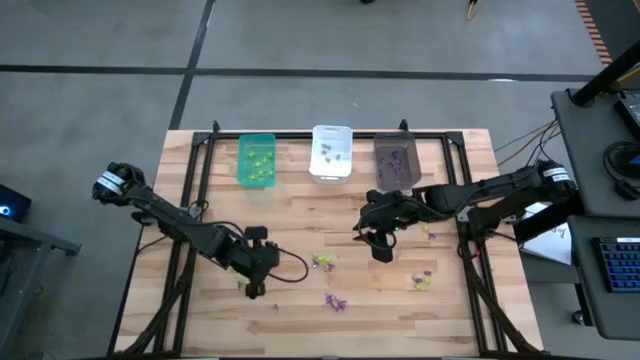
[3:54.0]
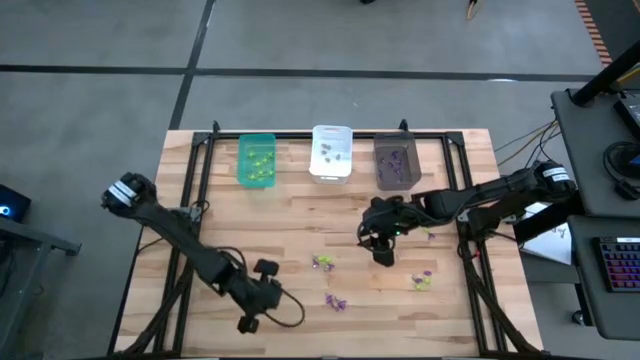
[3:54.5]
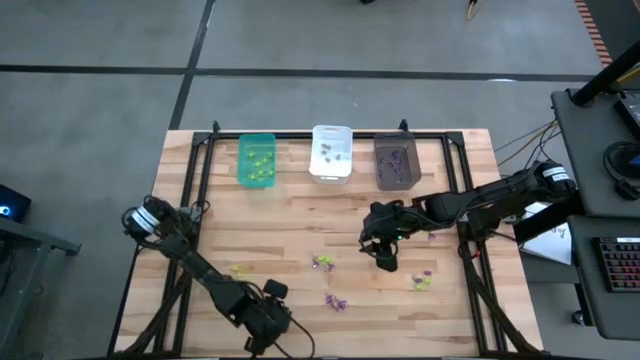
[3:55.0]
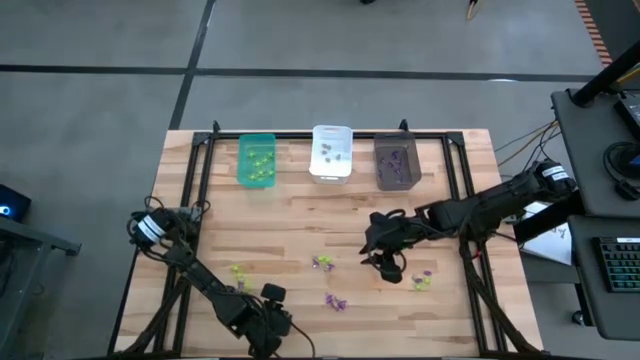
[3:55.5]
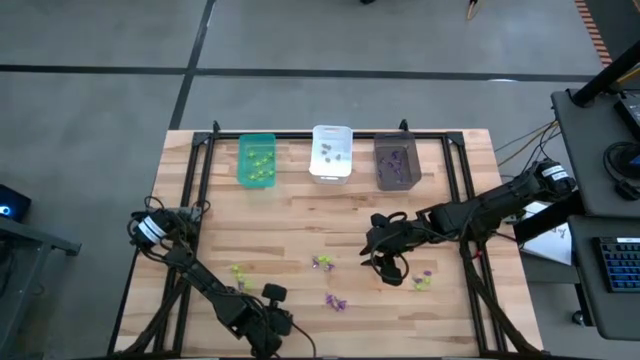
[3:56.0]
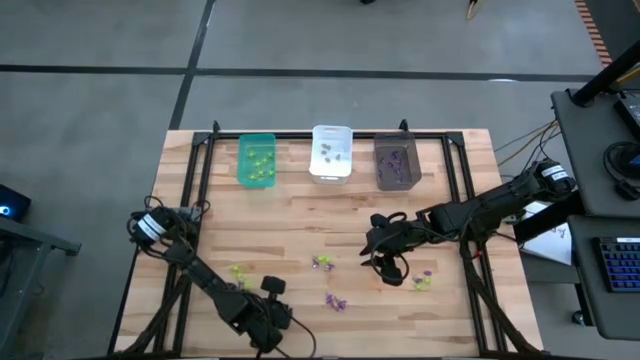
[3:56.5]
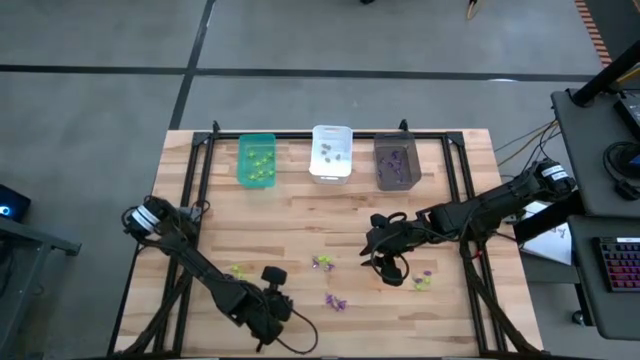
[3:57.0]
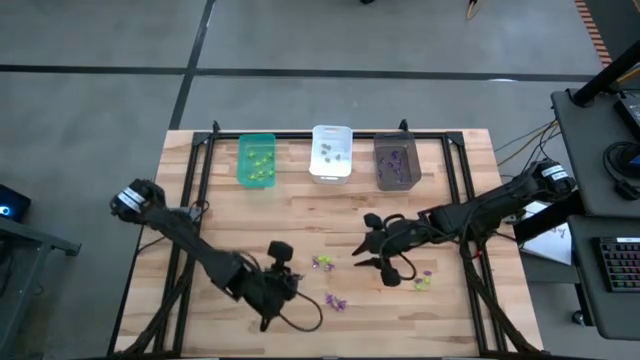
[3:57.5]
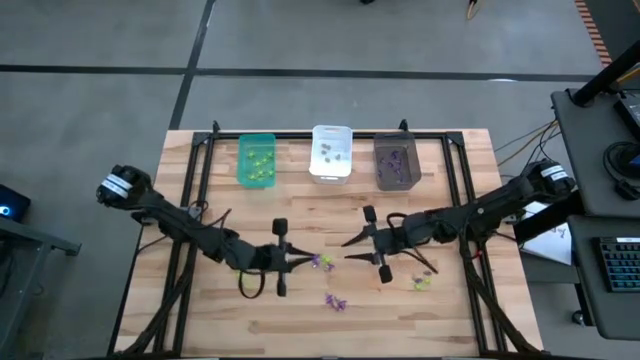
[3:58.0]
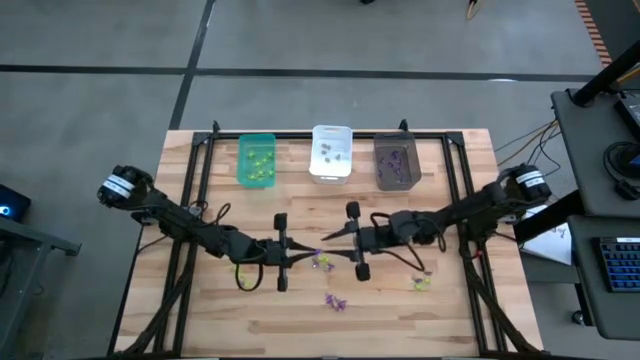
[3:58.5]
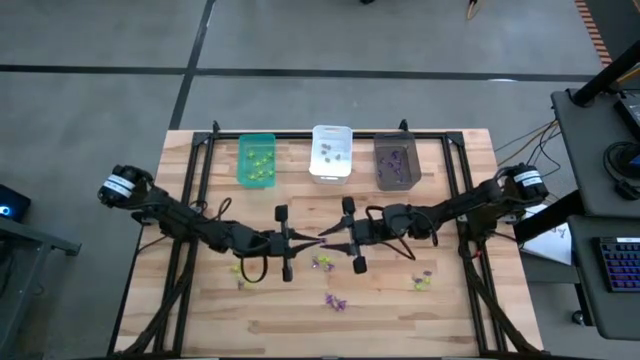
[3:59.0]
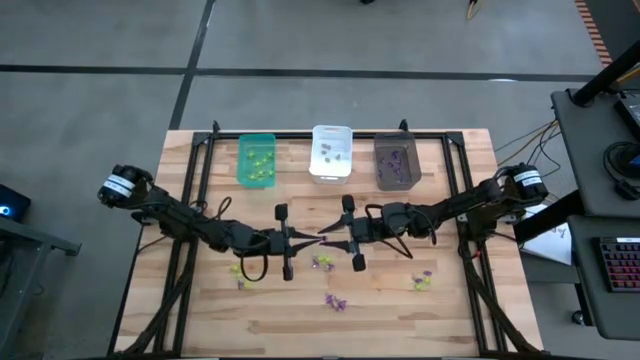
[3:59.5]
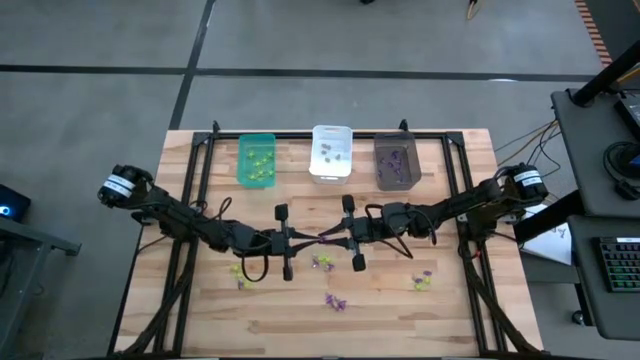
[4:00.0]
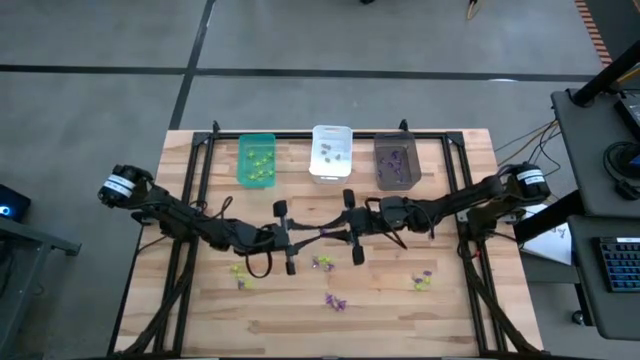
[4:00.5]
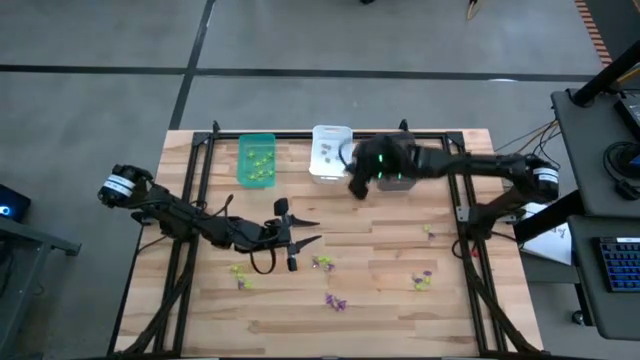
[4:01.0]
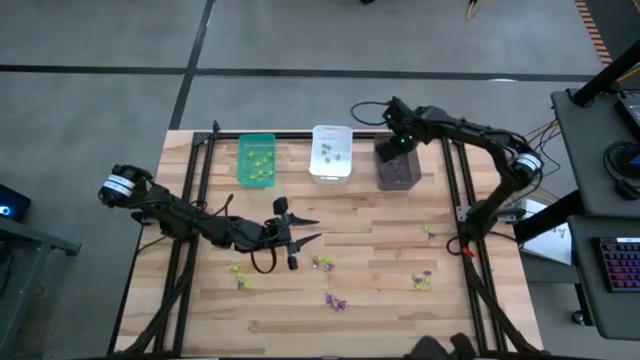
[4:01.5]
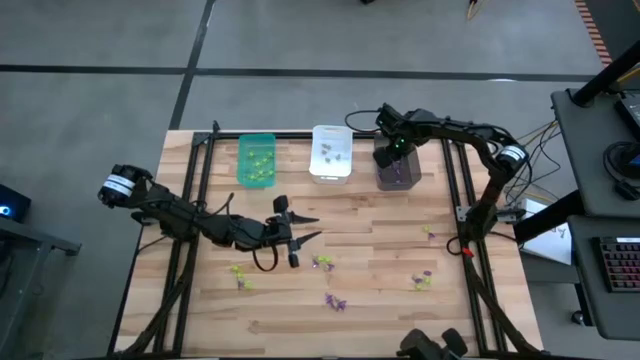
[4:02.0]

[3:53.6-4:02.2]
Task: Sort Halloween decoration
Put the purple witch hat toy into the gray bin

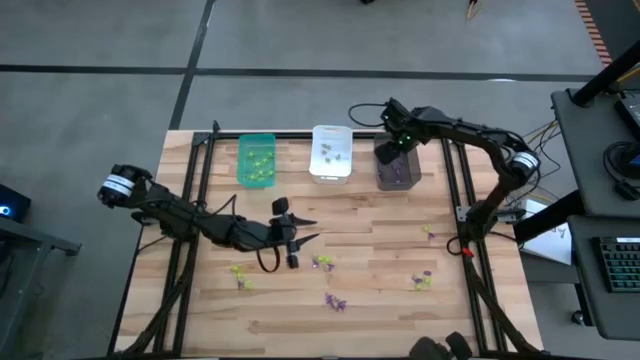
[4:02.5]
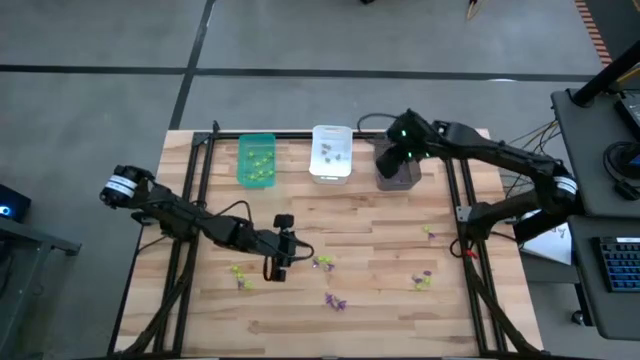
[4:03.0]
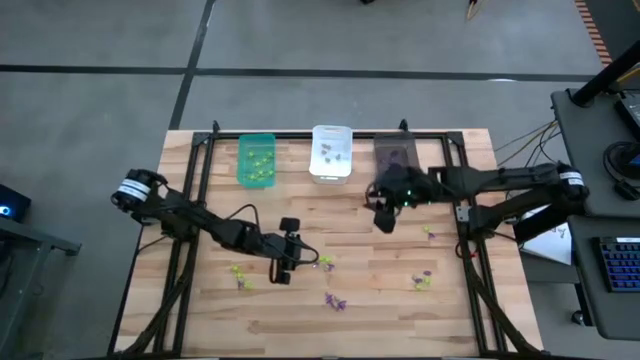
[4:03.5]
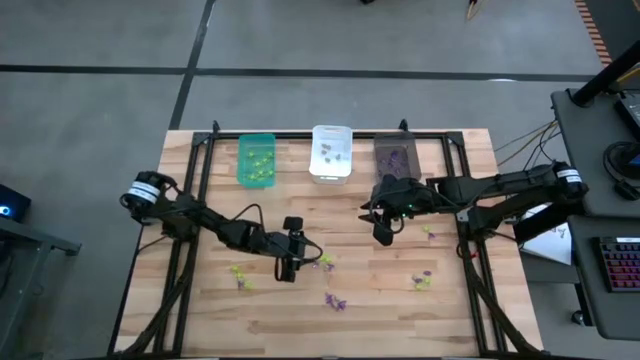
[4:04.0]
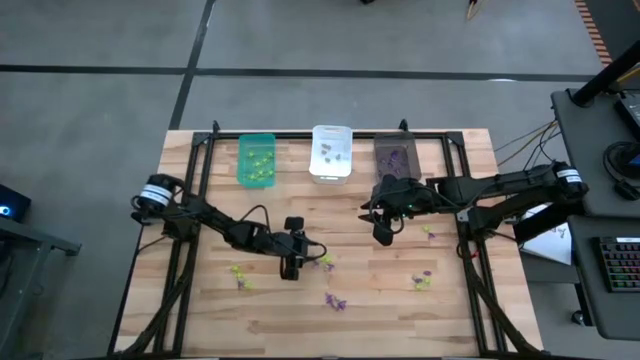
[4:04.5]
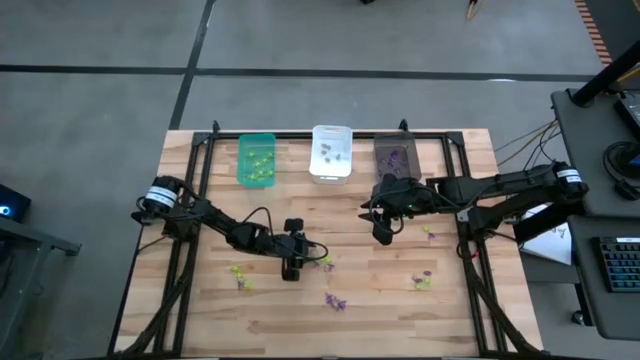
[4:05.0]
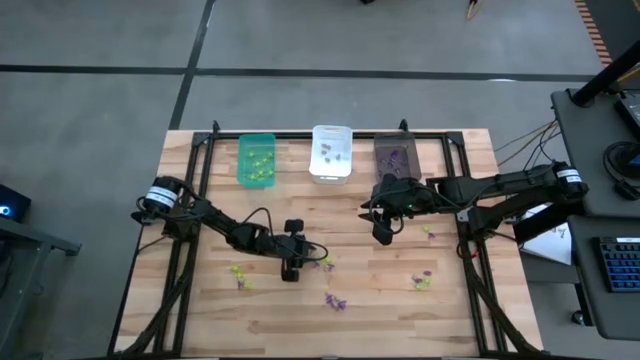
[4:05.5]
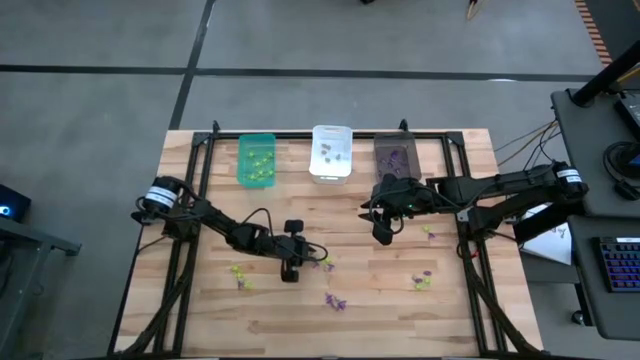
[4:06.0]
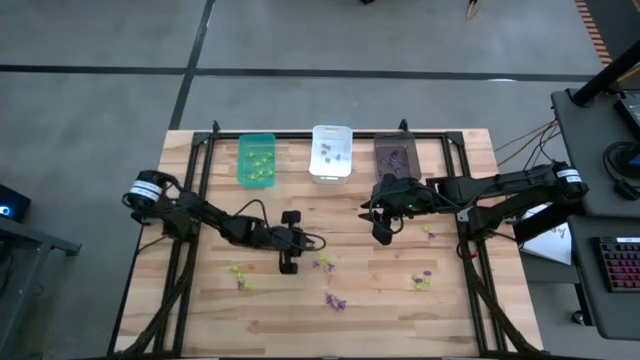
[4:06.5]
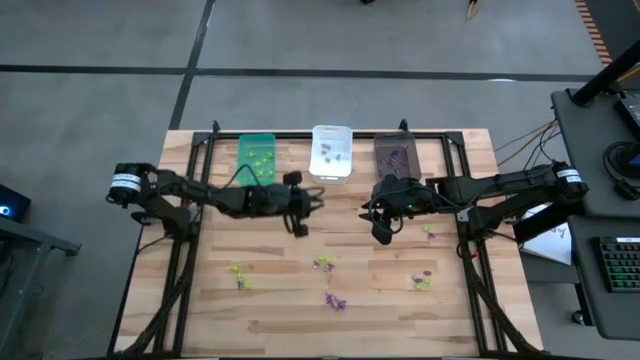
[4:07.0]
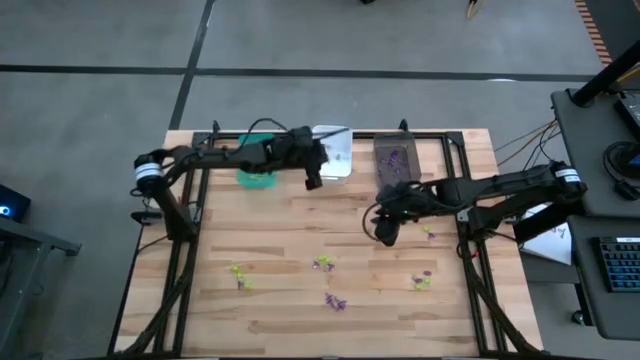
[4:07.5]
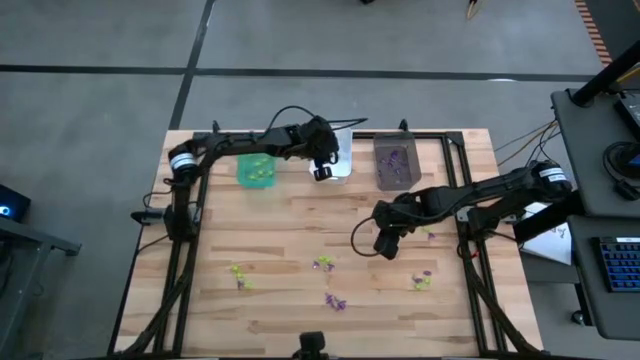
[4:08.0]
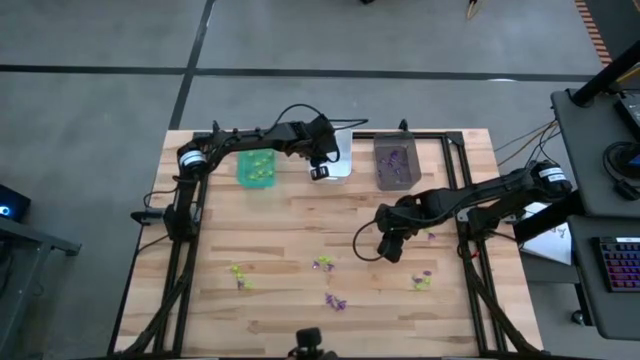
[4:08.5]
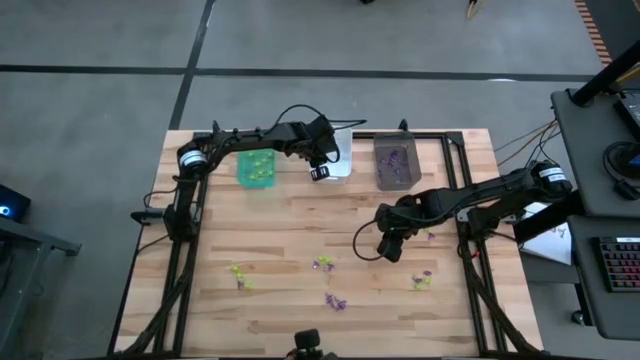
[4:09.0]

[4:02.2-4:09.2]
Put the white skull toy into the white bin

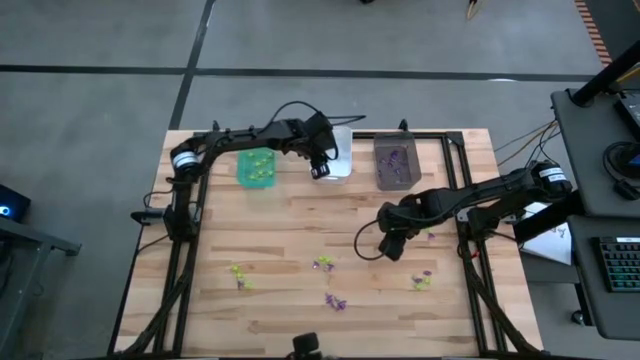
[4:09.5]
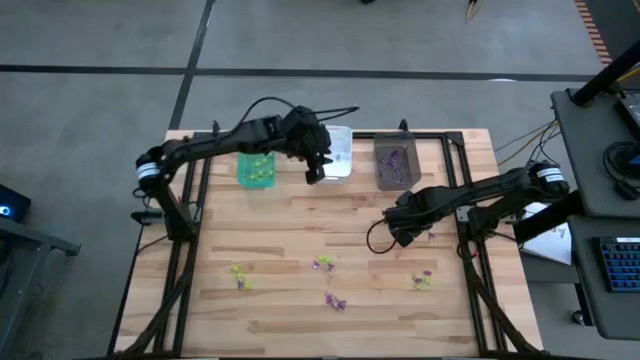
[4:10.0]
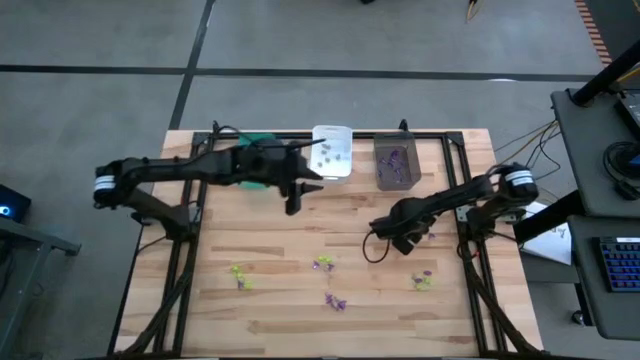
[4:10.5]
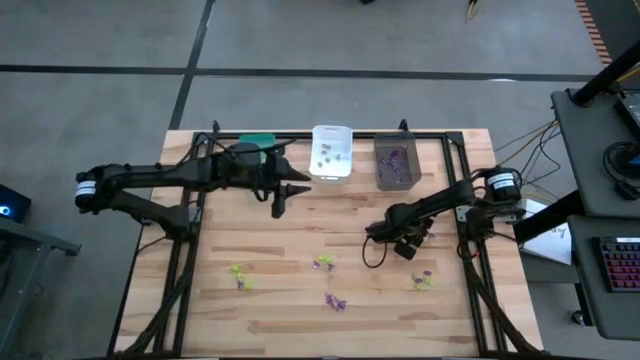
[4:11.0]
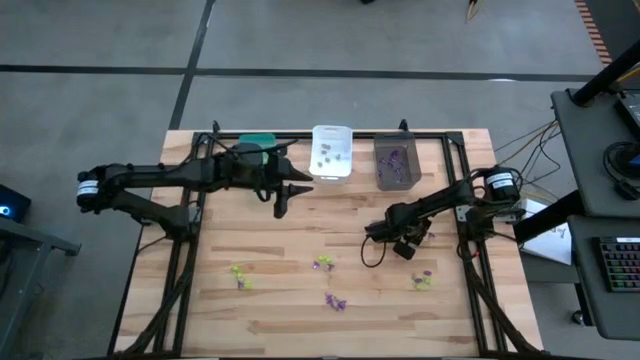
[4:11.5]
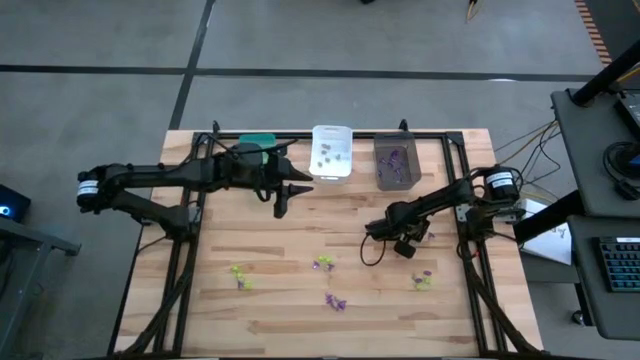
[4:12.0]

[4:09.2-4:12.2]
Put the green spider toy into the blue bin
